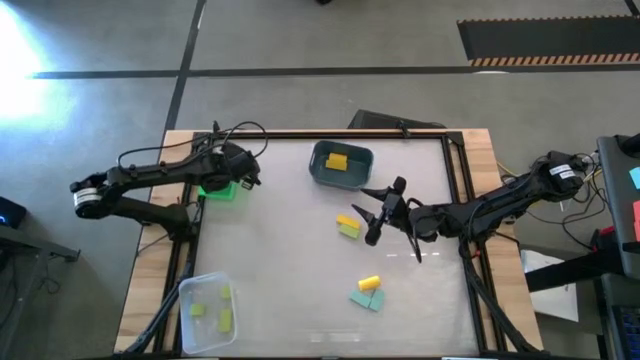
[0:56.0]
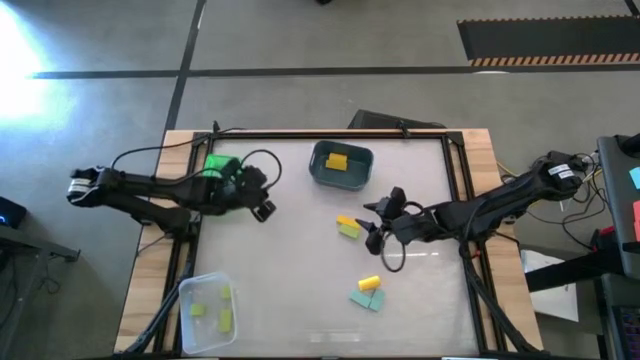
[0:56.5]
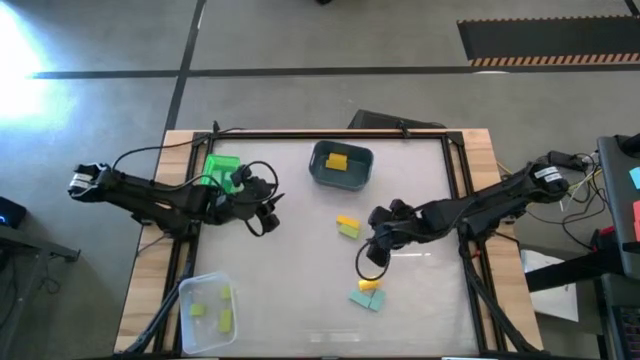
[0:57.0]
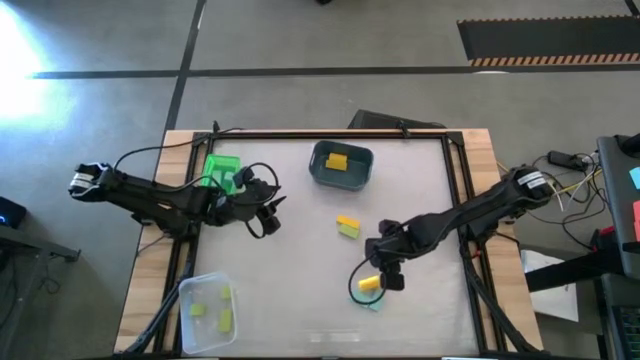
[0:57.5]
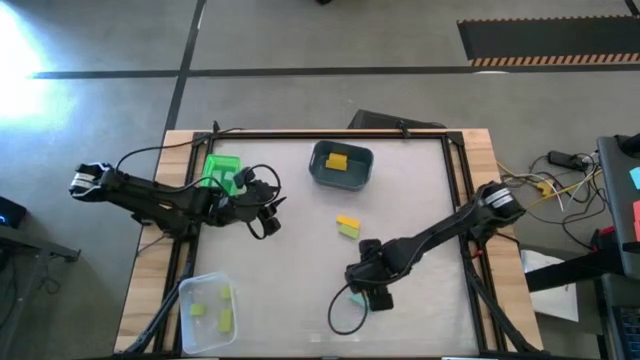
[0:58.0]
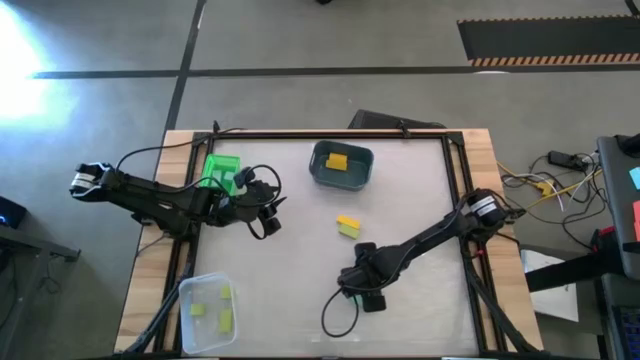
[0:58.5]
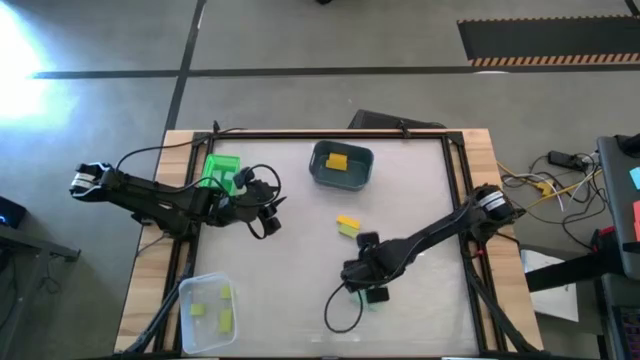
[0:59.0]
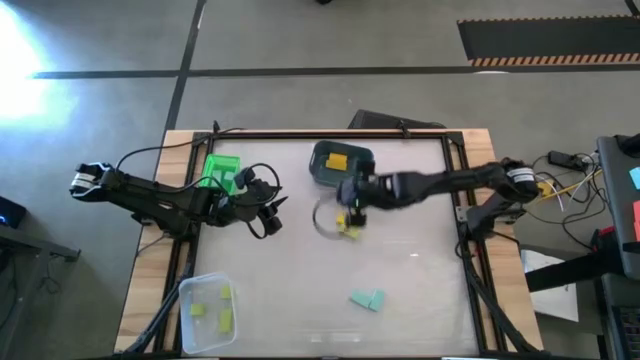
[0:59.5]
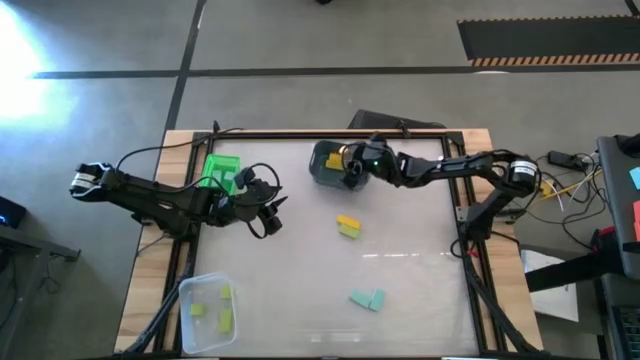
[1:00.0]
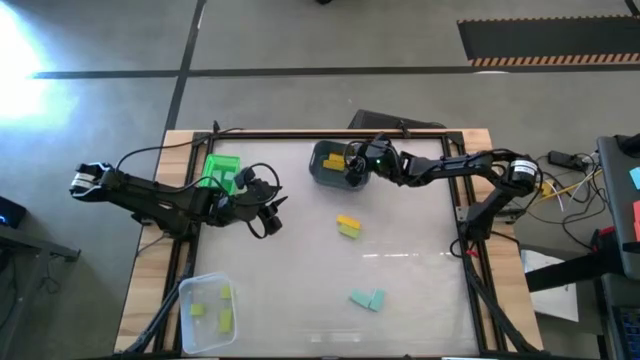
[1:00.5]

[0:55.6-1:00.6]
Task: Sort & place blocks by color
Put the yellow block into the blue bin

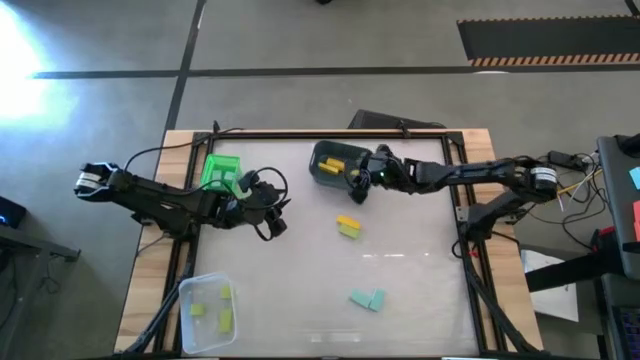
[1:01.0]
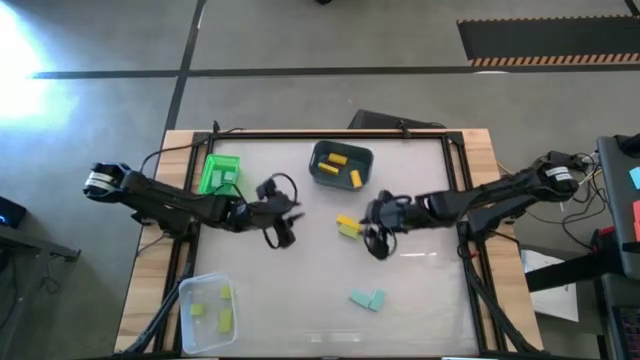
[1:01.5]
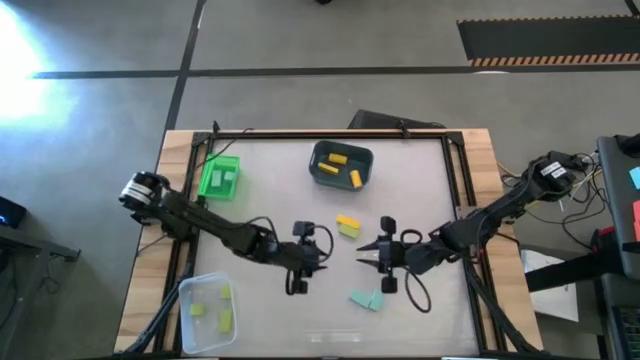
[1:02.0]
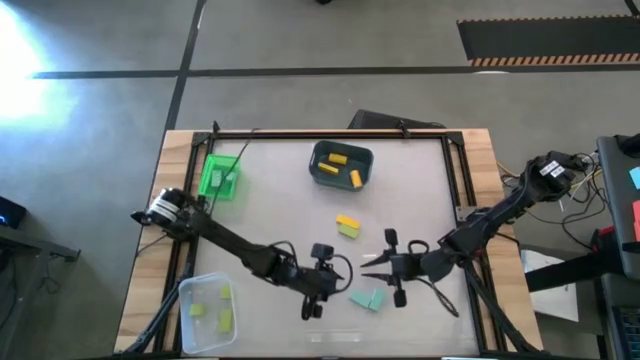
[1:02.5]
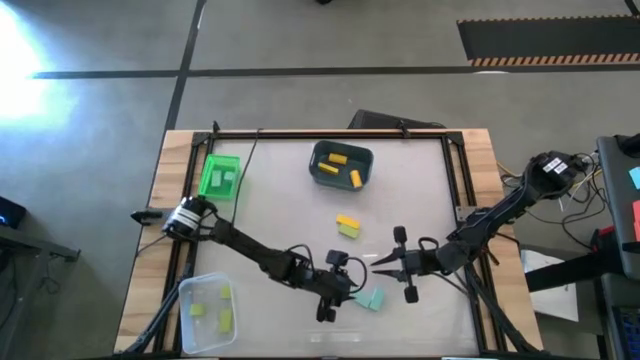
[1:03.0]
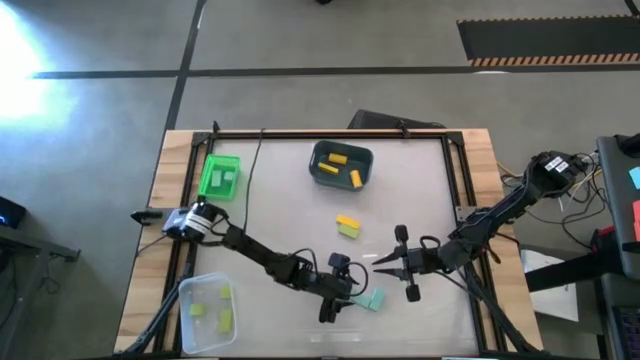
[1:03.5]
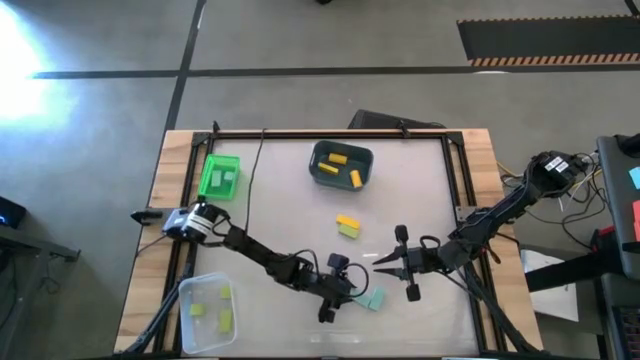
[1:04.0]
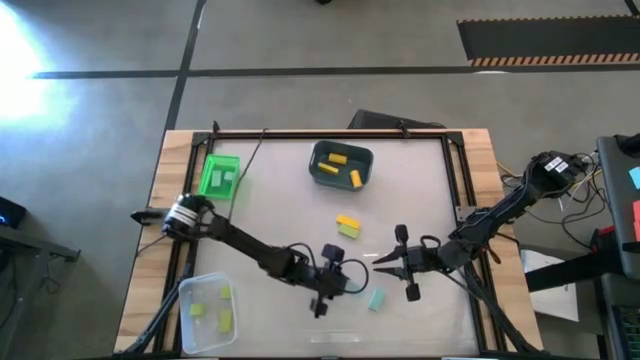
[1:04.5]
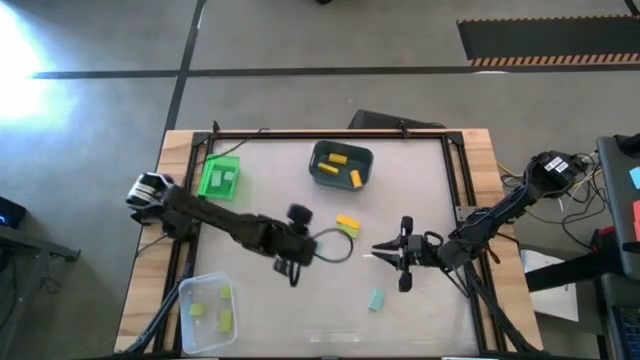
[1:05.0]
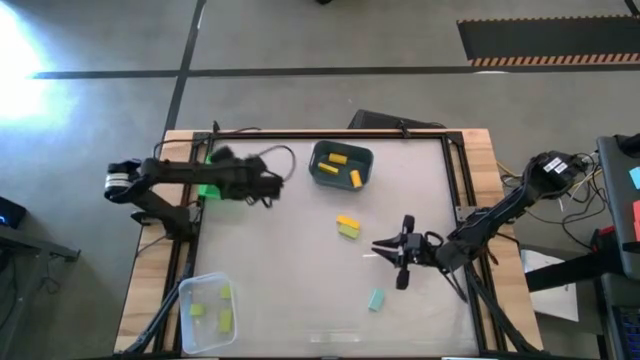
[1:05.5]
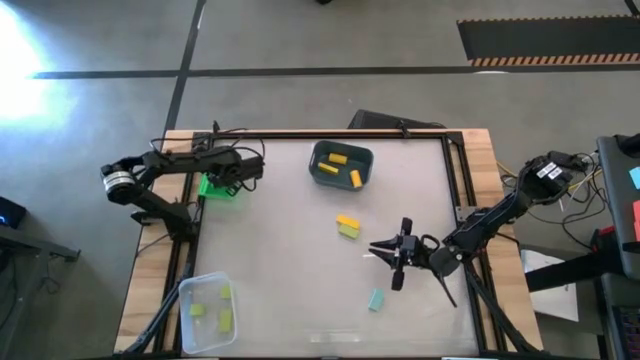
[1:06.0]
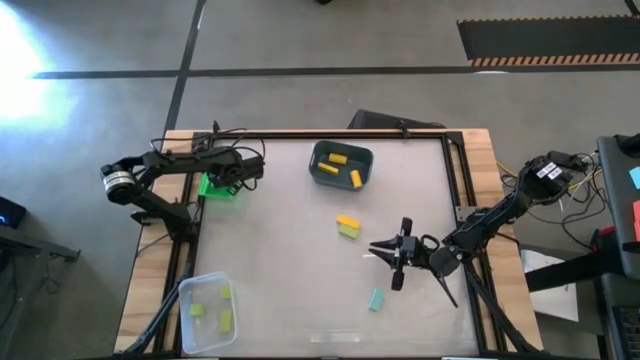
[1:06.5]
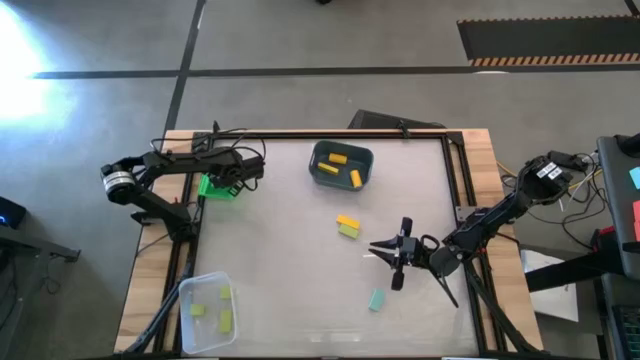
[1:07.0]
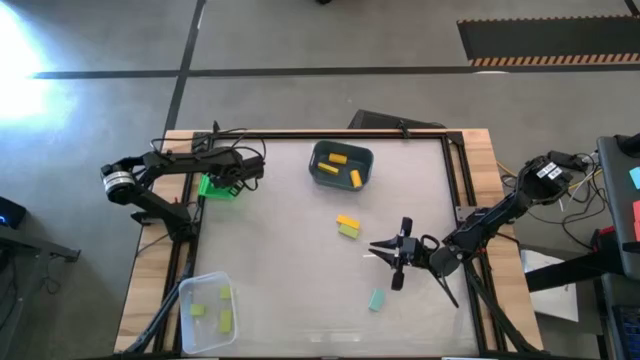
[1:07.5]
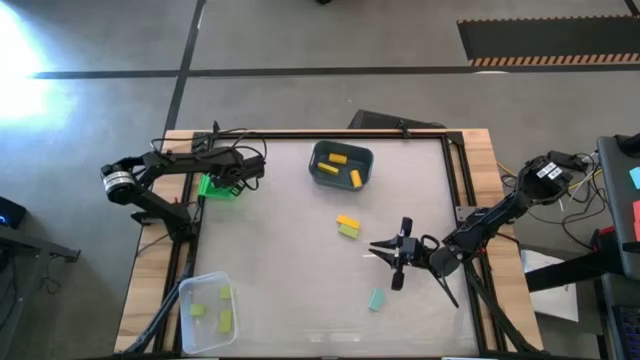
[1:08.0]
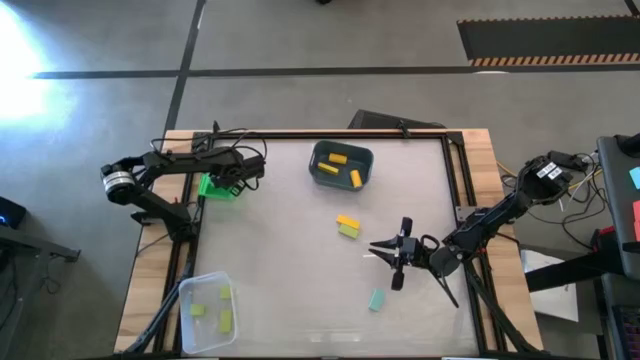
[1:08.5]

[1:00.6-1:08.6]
Put the blue block into the green bin

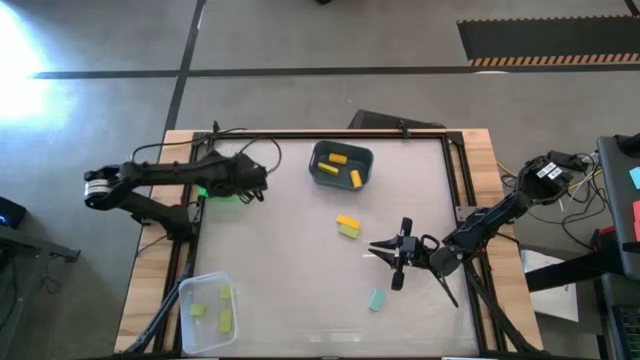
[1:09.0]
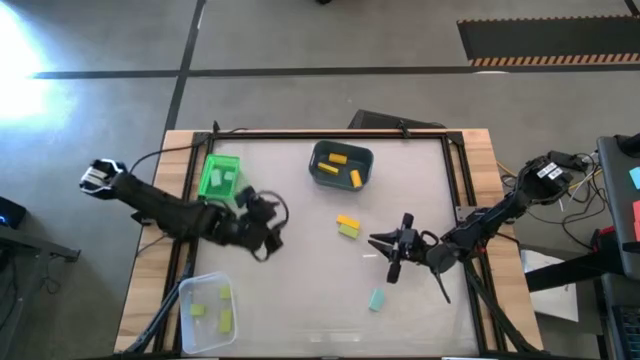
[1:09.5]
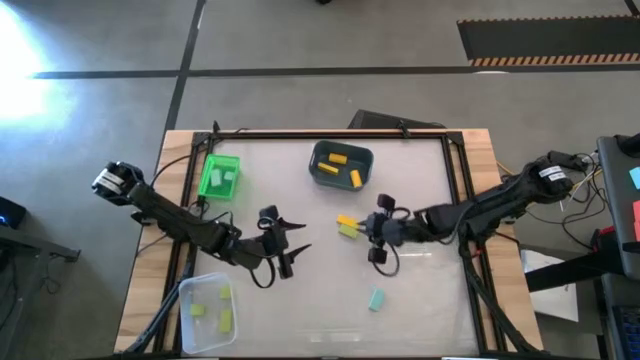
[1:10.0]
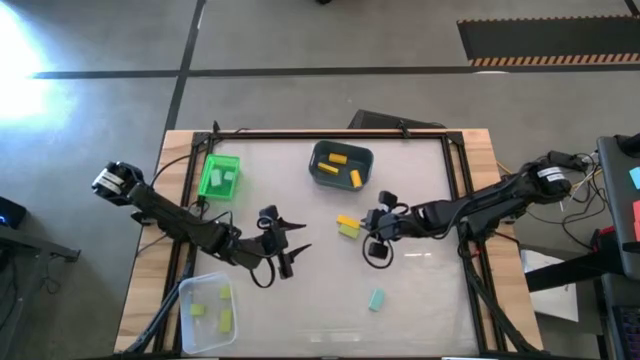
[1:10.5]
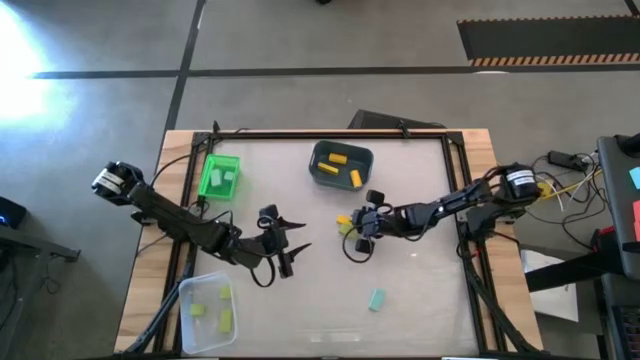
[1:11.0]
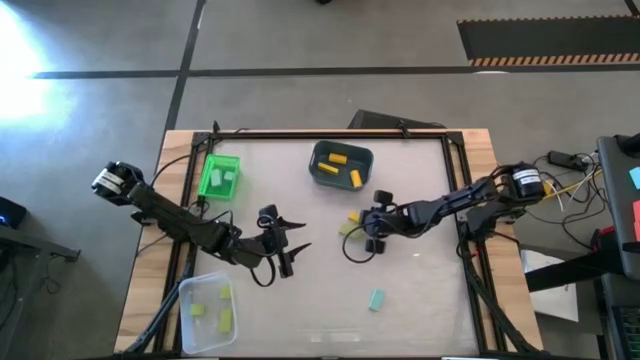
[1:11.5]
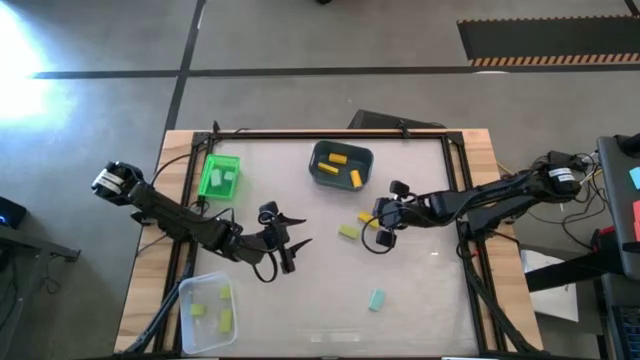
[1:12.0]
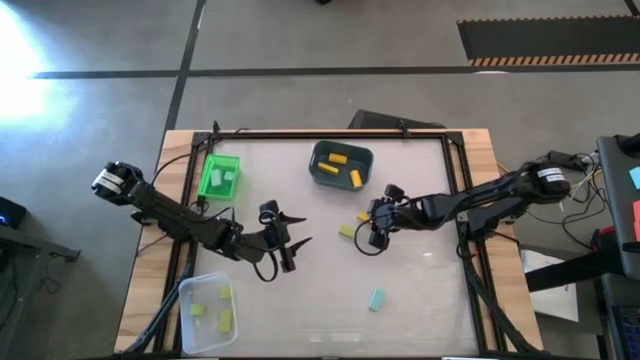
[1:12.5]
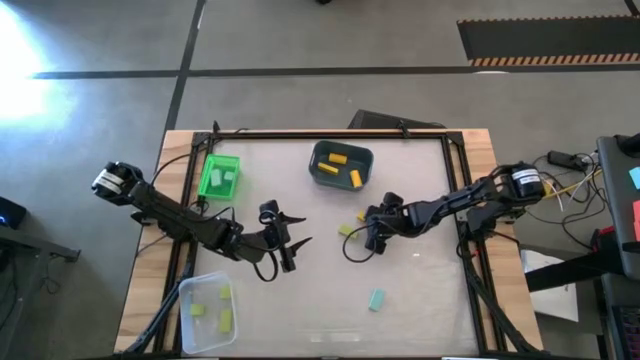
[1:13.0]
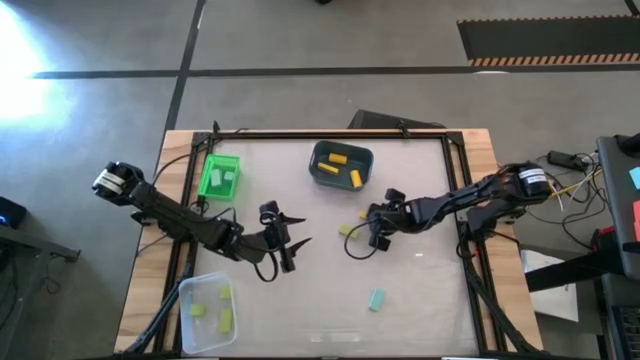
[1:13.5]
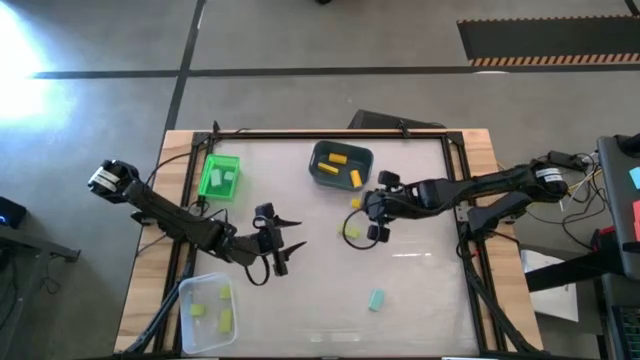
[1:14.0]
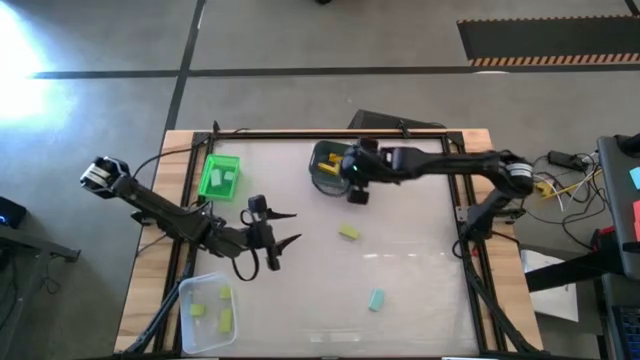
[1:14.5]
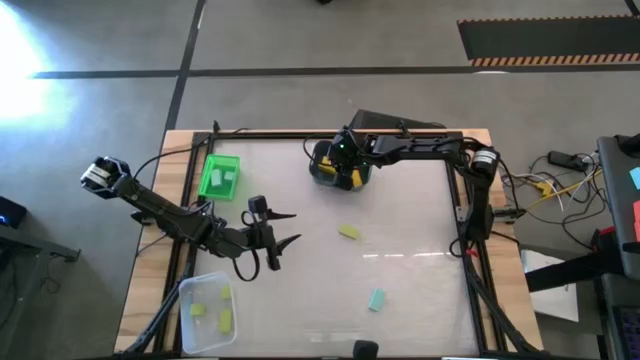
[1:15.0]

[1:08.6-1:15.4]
Put the yellow block into the blue bin

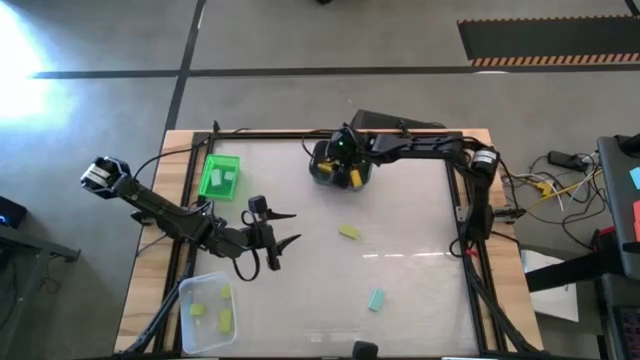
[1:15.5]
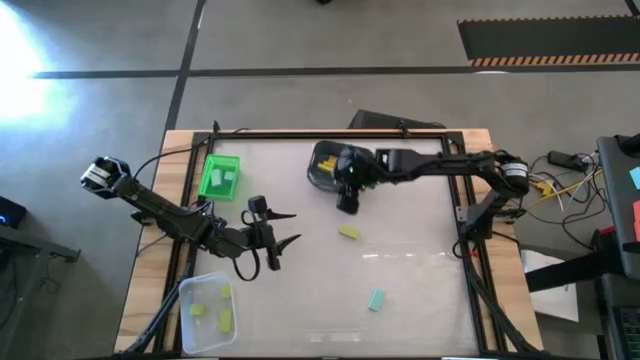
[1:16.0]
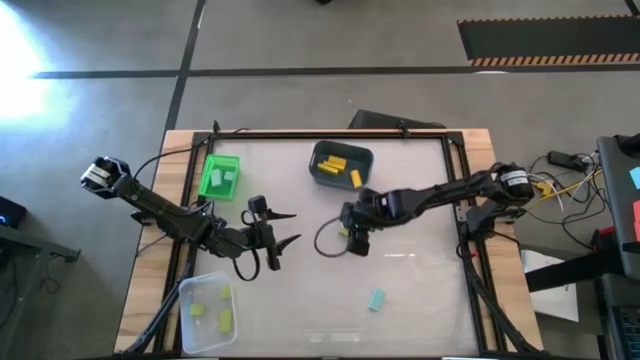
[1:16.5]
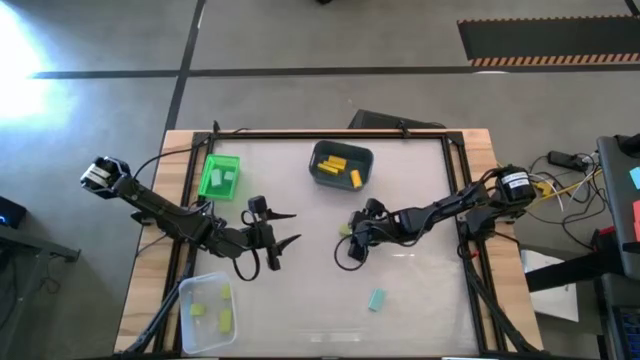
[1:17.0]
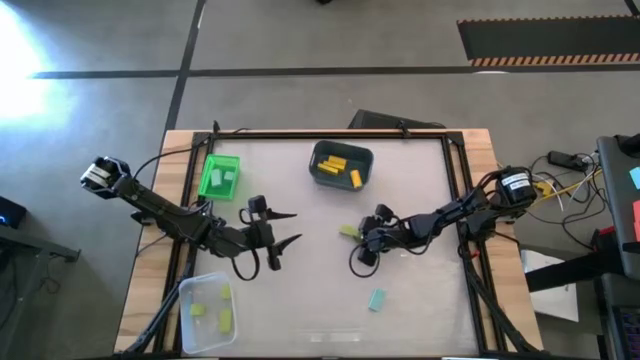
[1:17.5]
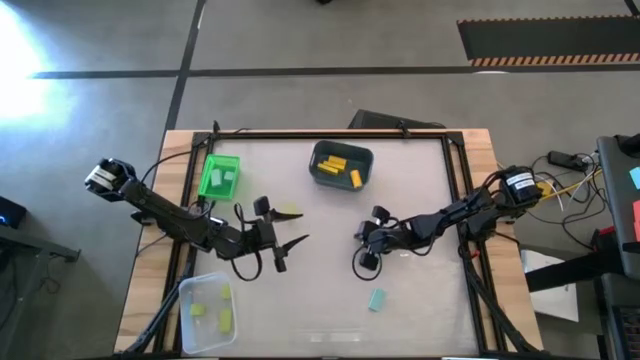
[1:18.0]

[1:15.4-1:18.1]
Put the green block into the transparent bin
